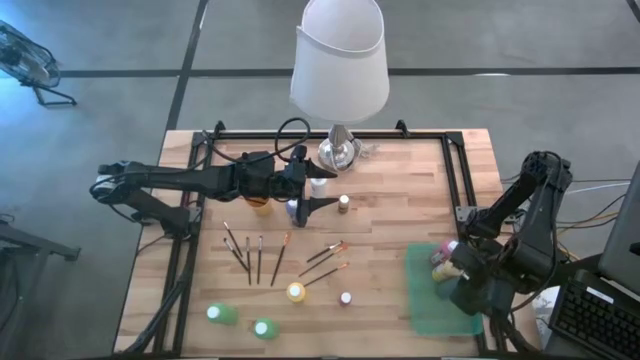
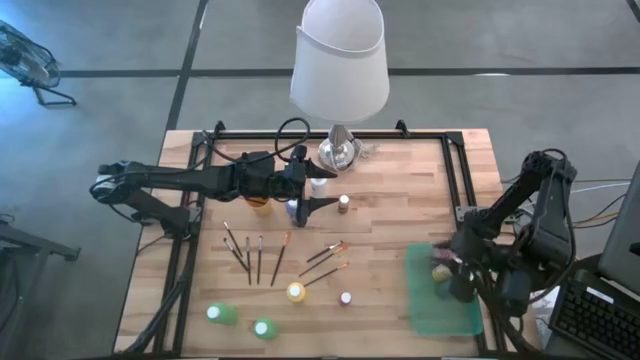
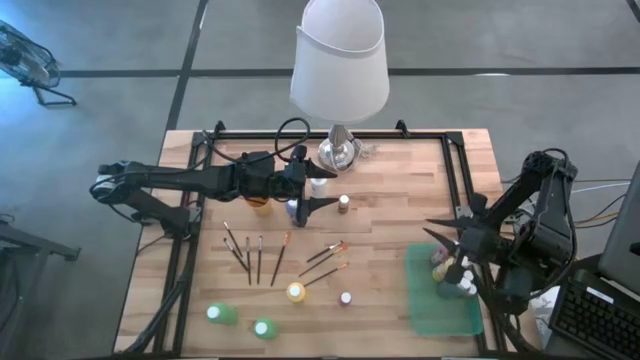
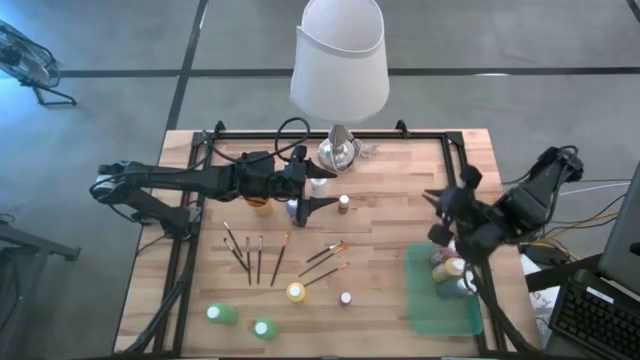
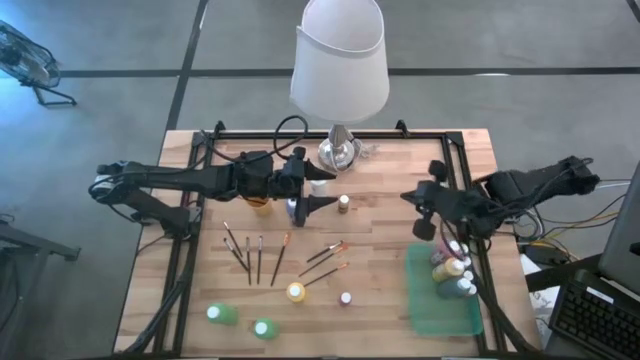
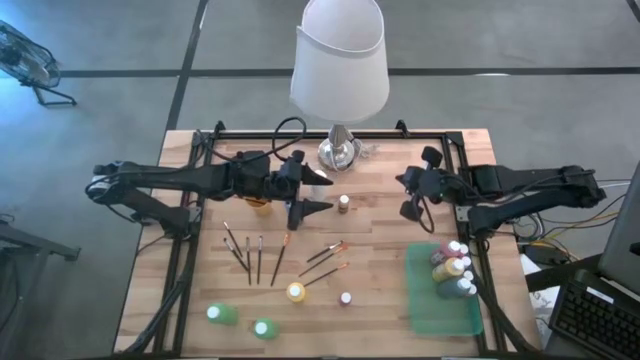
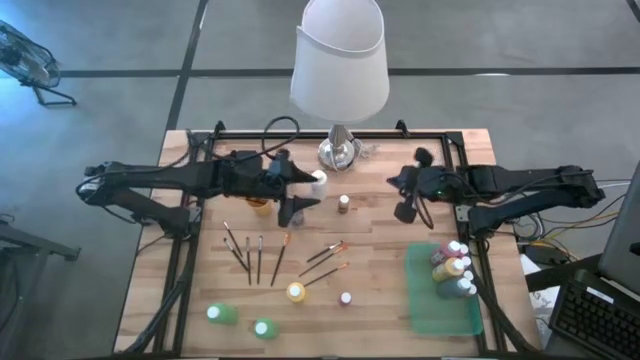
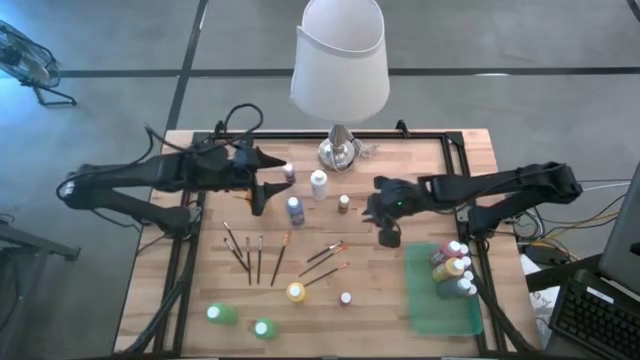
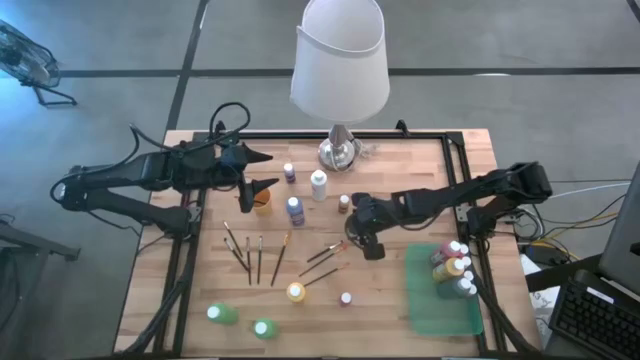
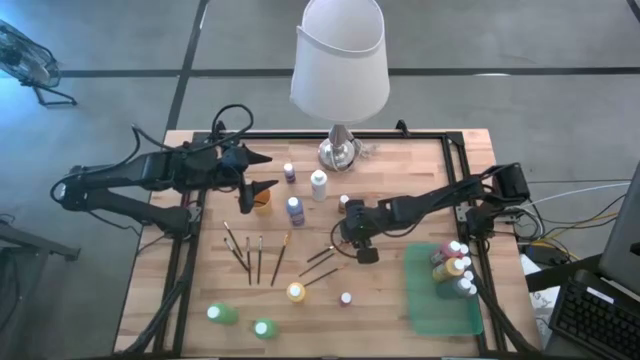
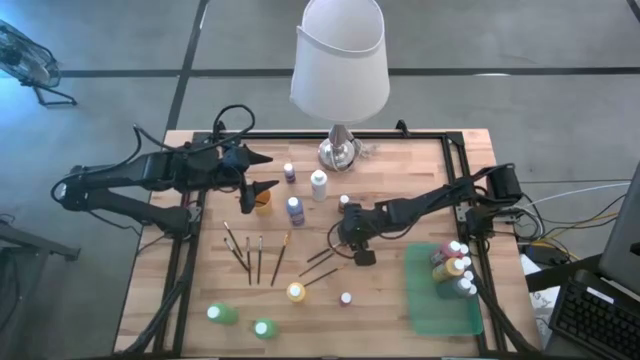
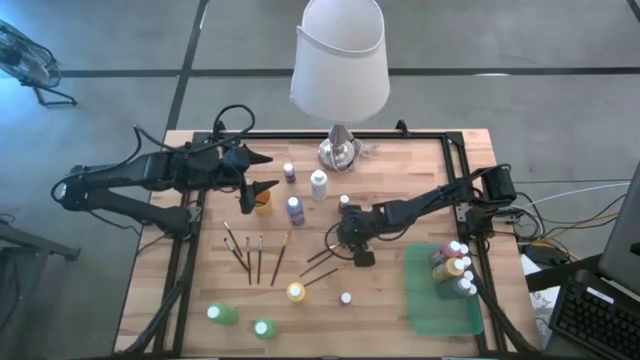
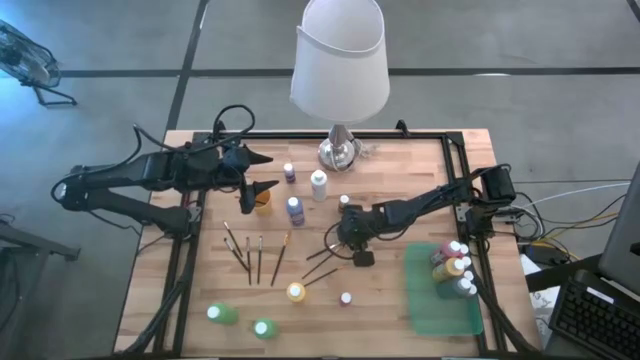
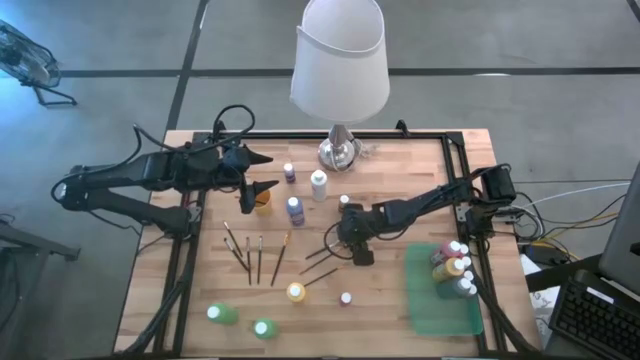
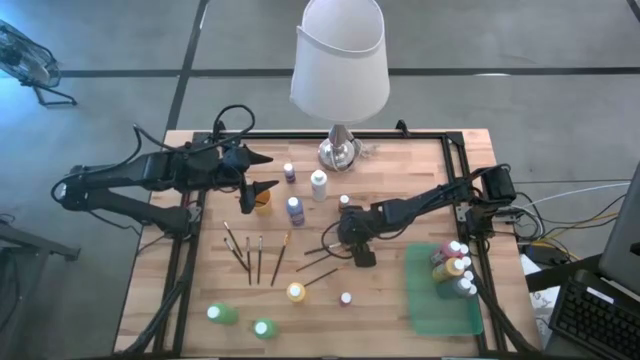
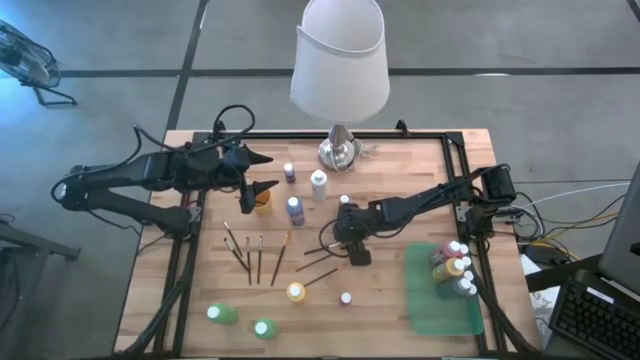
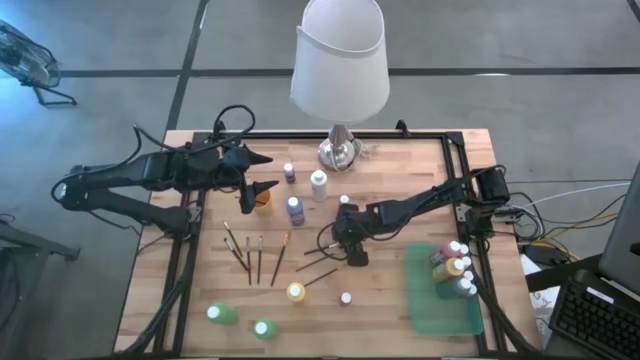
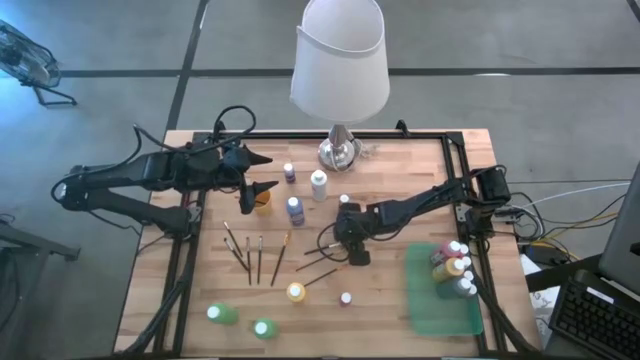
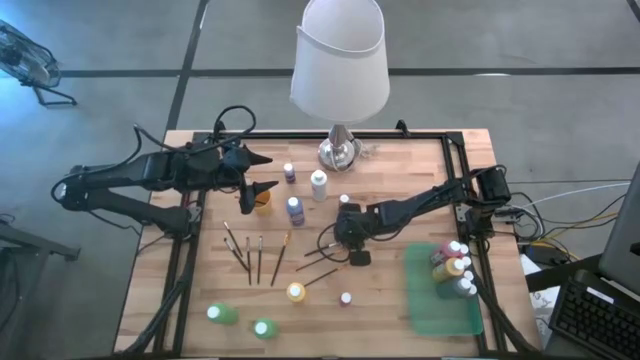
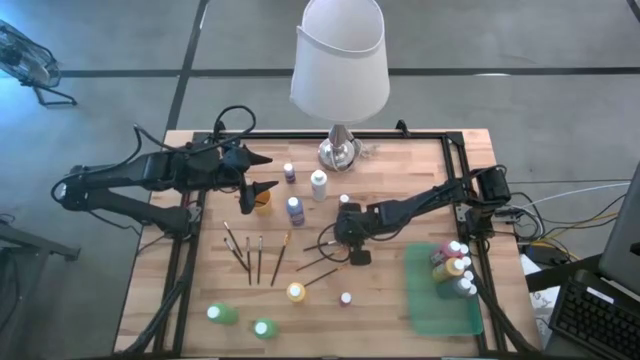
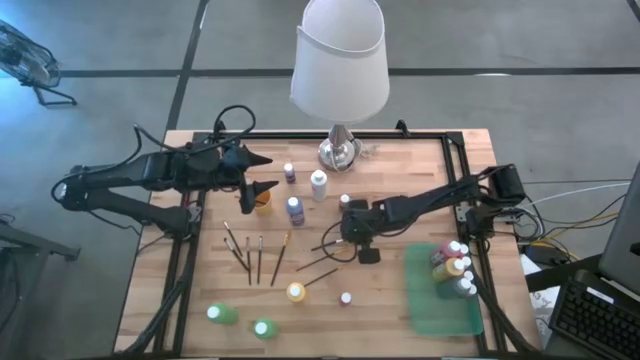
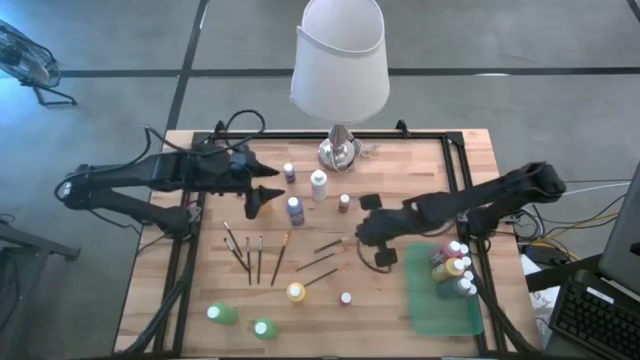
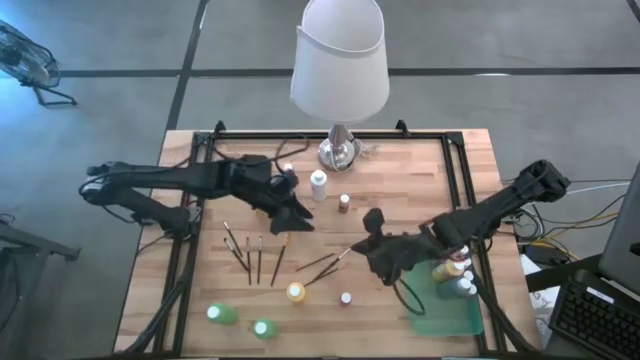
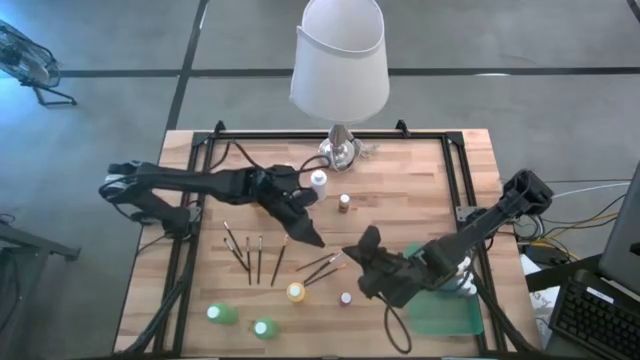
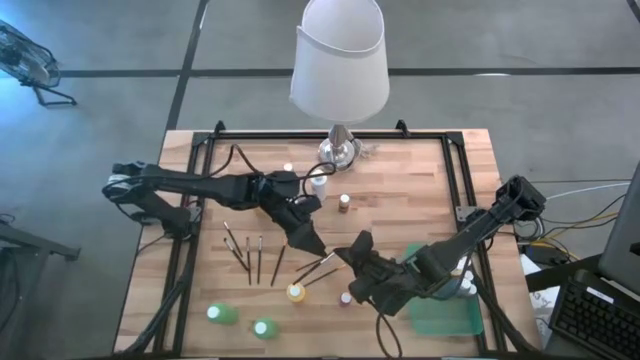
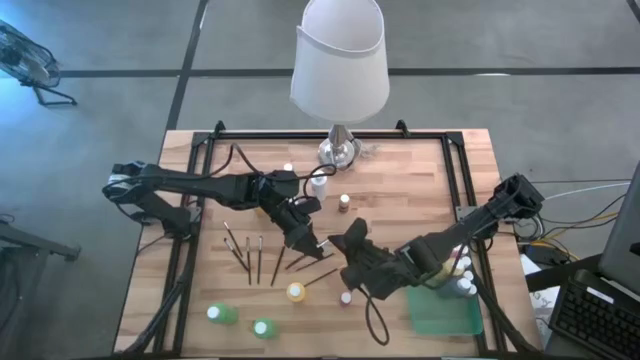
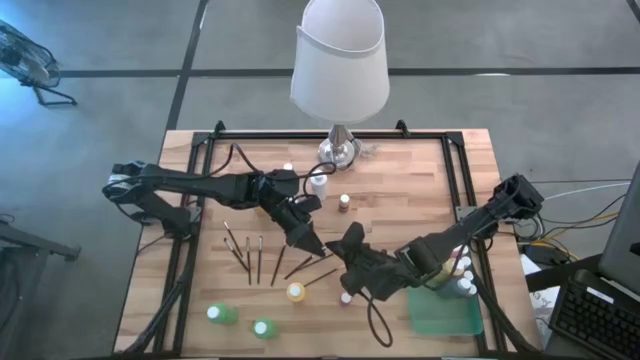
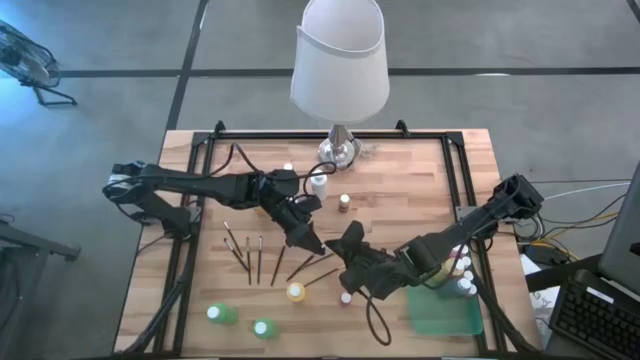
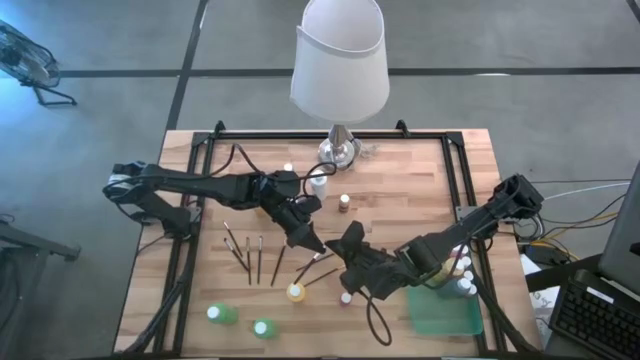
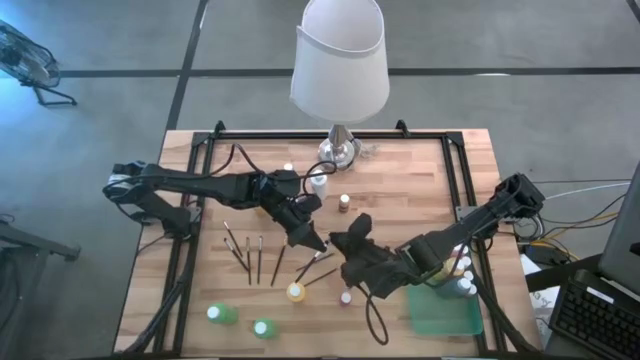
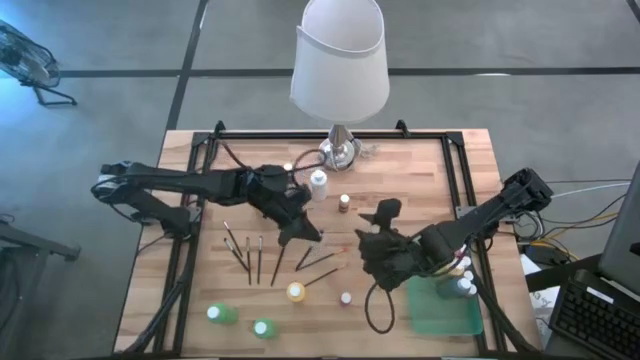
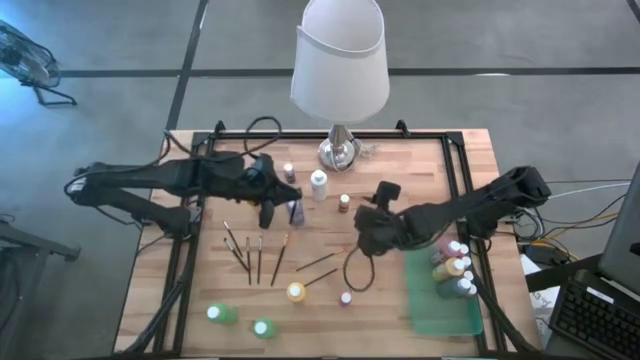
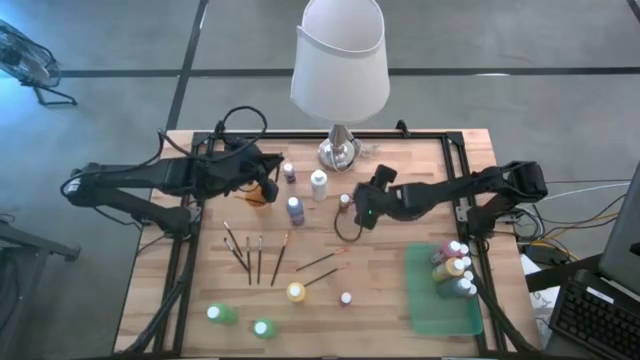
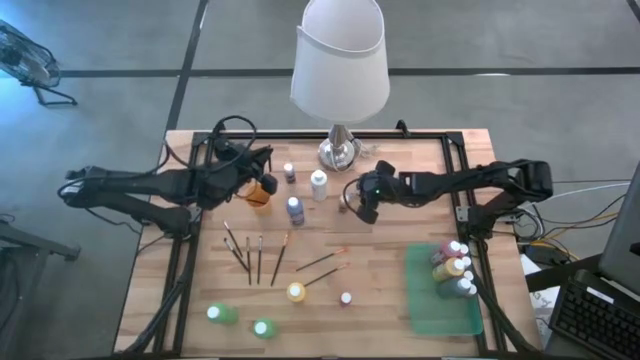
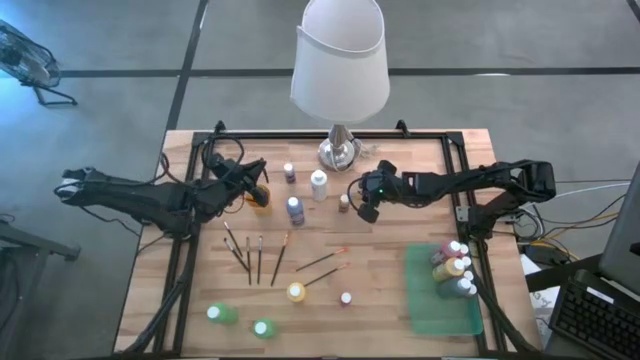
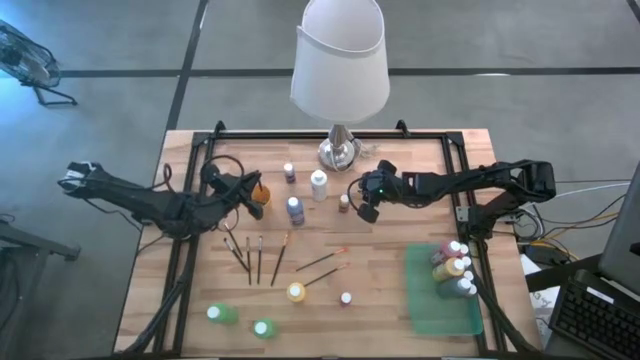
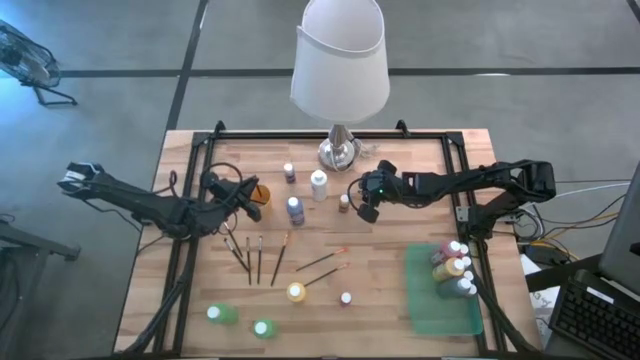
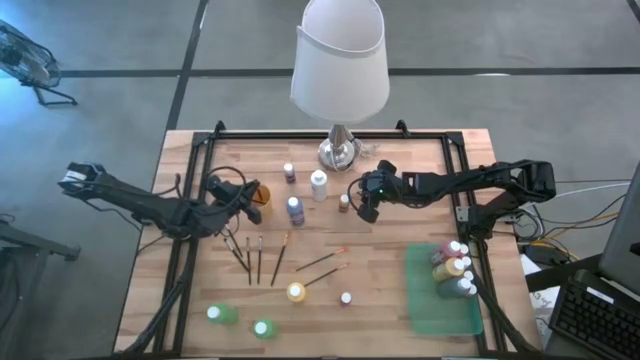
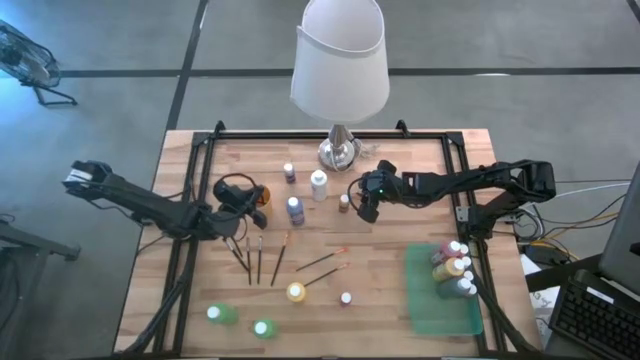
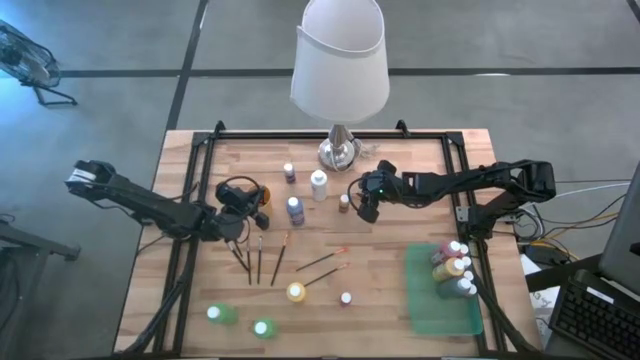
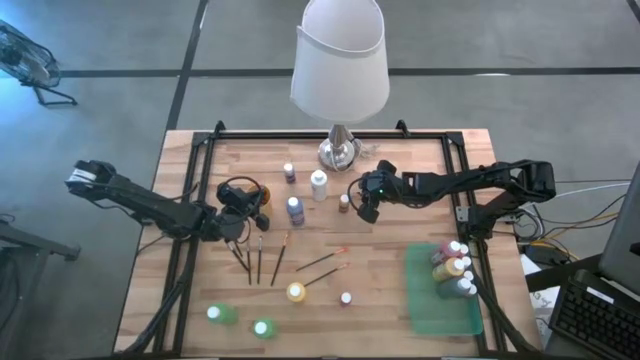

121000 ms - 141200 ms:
Task: Pick & Place Paint Supplies
Put the silver paint brush into the yellow cup
